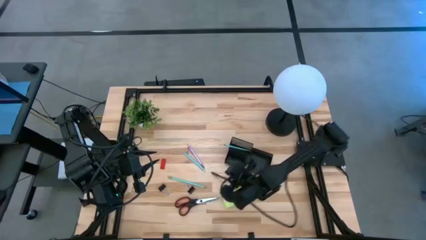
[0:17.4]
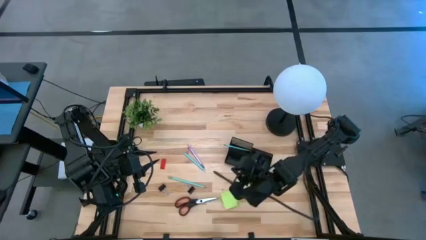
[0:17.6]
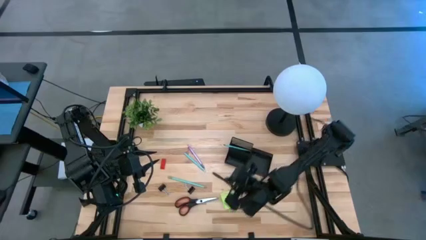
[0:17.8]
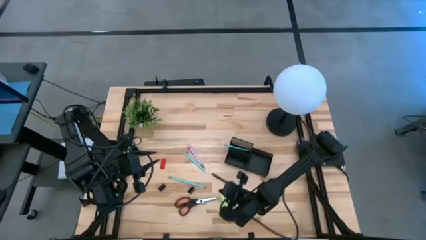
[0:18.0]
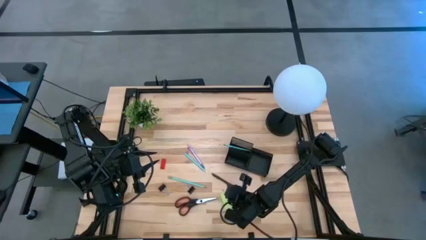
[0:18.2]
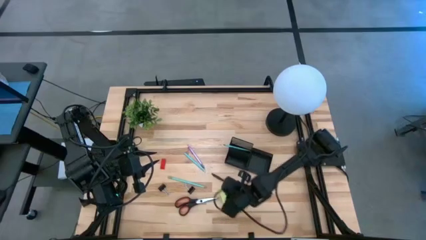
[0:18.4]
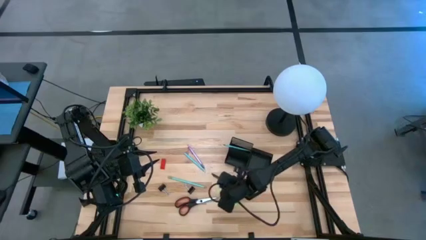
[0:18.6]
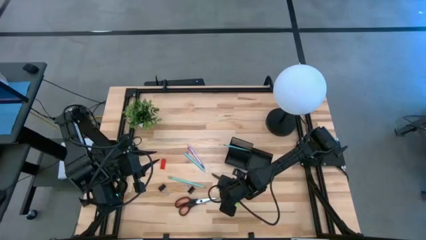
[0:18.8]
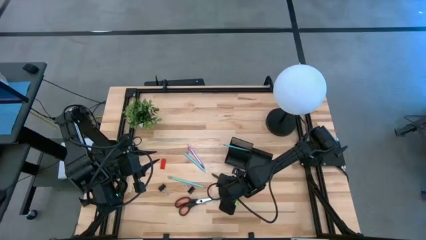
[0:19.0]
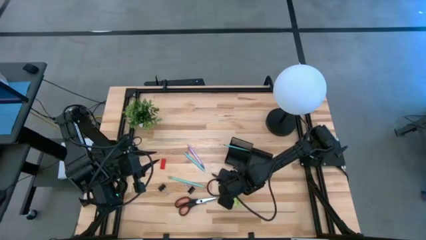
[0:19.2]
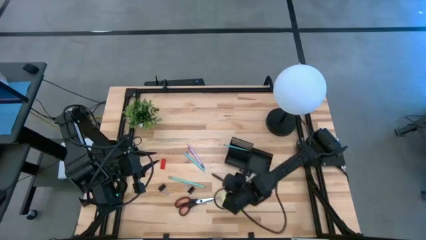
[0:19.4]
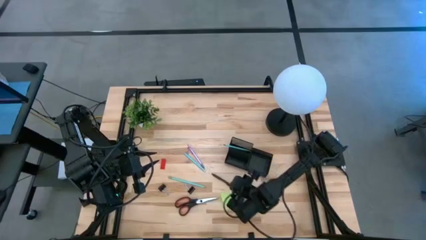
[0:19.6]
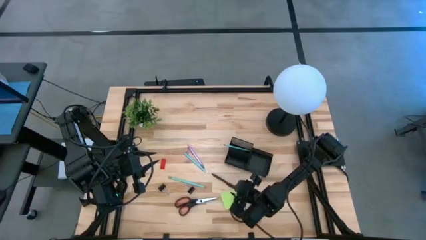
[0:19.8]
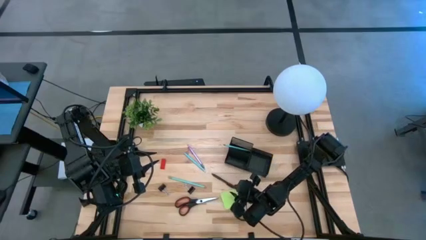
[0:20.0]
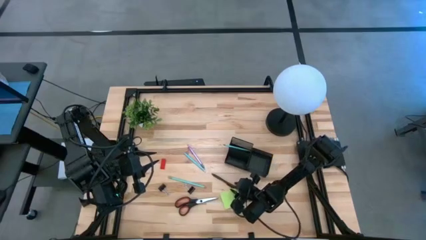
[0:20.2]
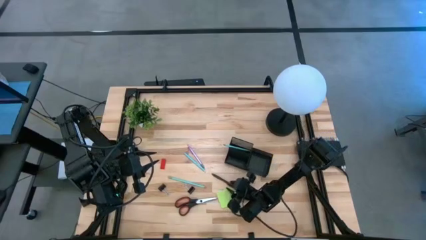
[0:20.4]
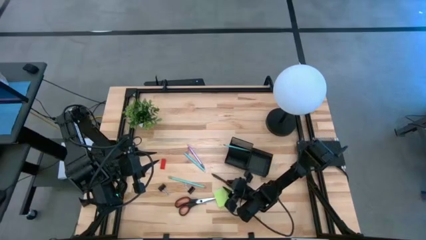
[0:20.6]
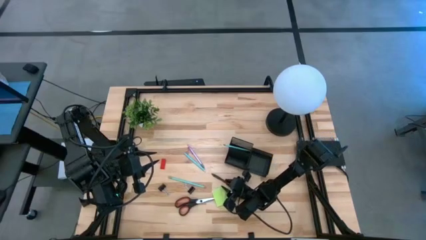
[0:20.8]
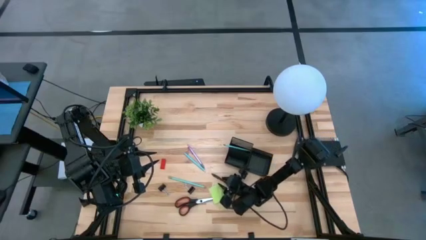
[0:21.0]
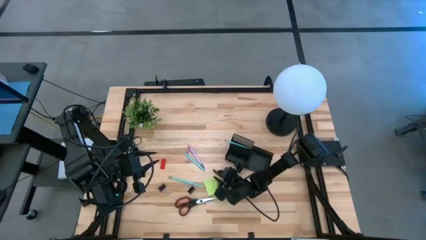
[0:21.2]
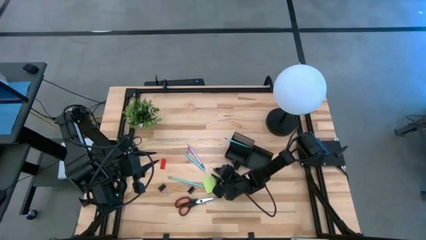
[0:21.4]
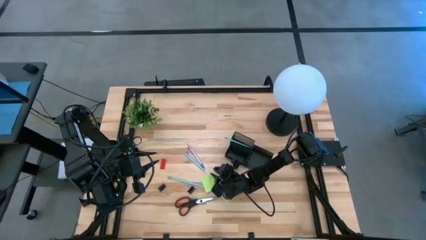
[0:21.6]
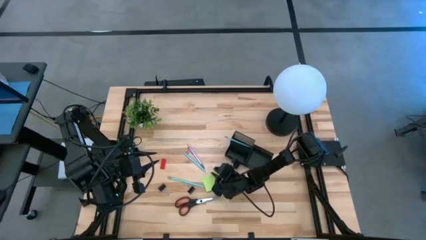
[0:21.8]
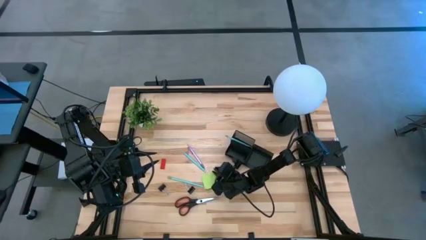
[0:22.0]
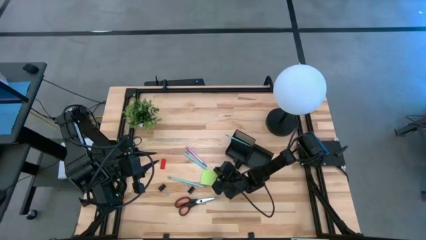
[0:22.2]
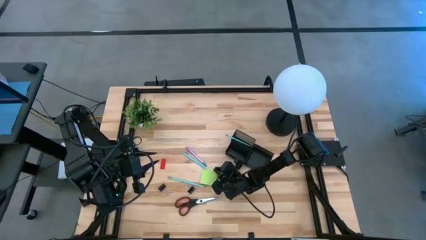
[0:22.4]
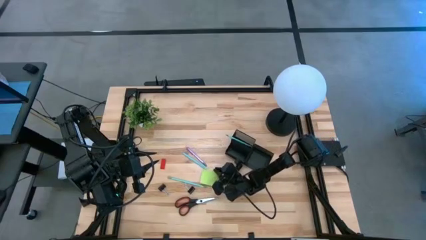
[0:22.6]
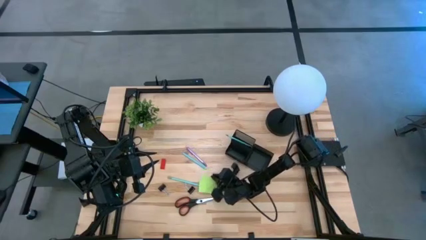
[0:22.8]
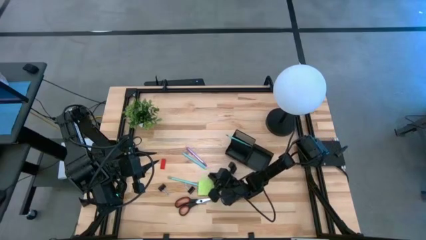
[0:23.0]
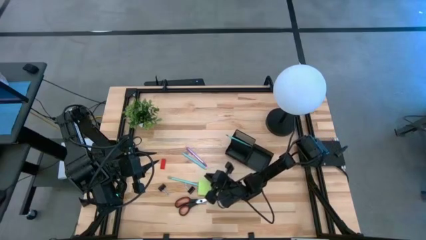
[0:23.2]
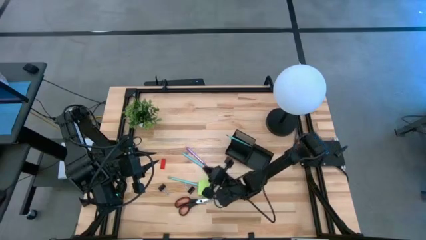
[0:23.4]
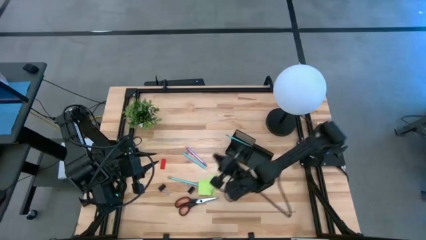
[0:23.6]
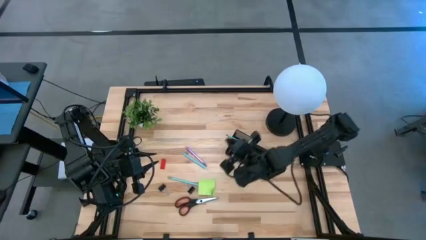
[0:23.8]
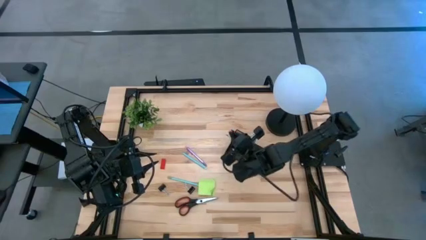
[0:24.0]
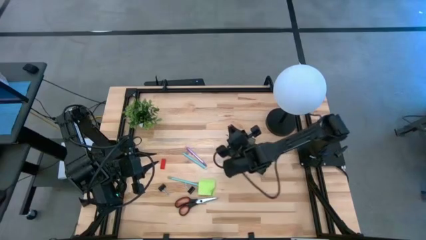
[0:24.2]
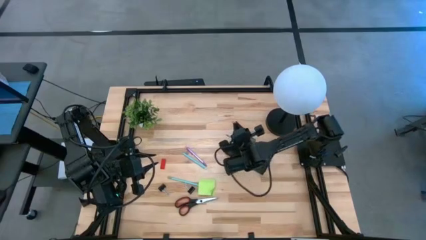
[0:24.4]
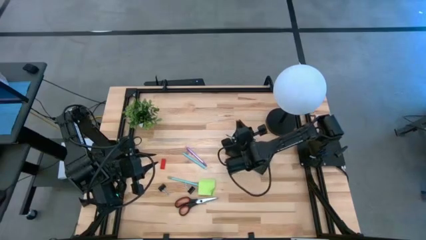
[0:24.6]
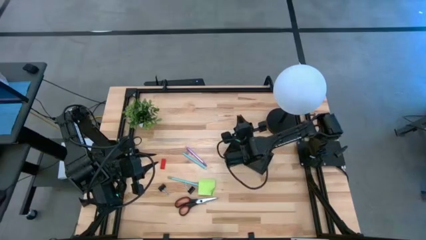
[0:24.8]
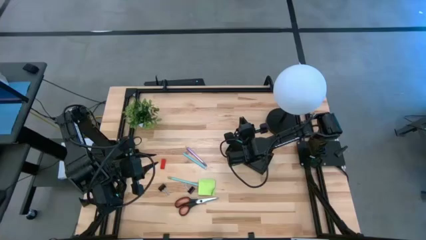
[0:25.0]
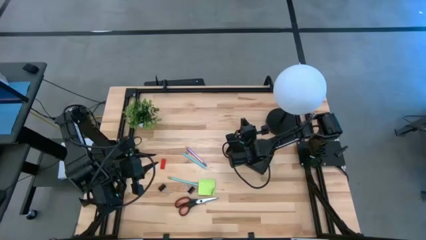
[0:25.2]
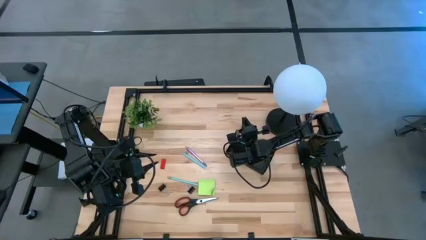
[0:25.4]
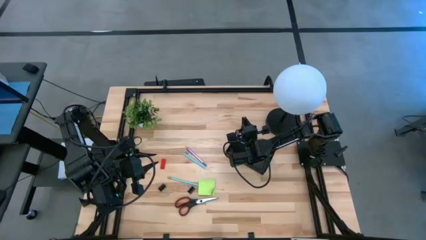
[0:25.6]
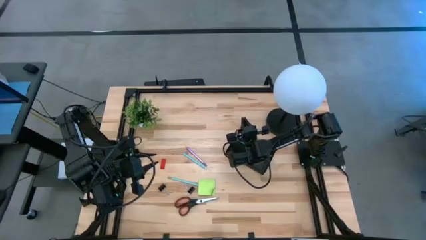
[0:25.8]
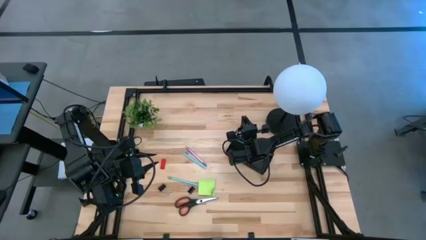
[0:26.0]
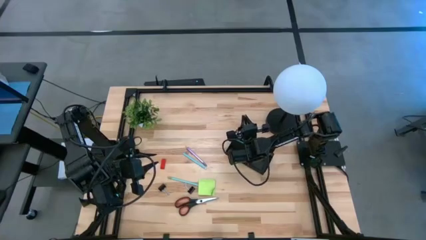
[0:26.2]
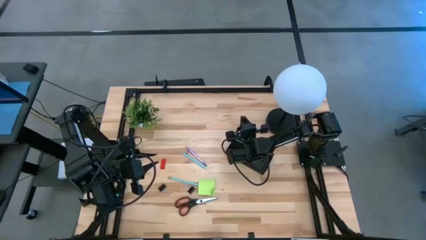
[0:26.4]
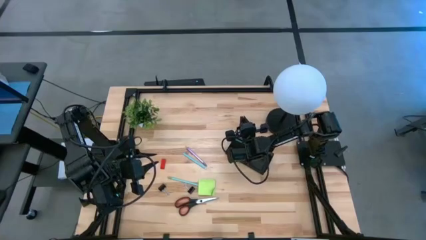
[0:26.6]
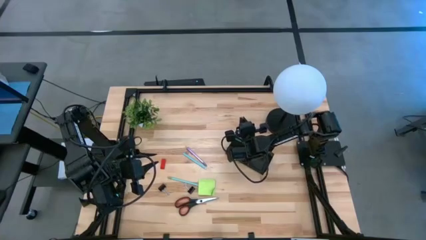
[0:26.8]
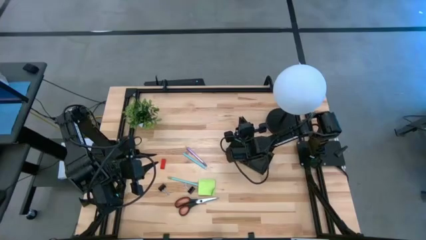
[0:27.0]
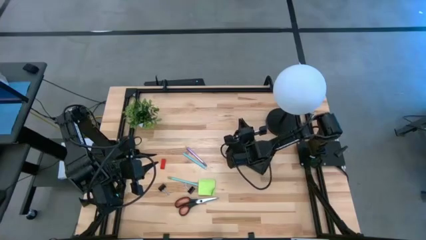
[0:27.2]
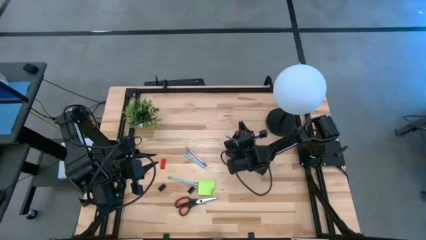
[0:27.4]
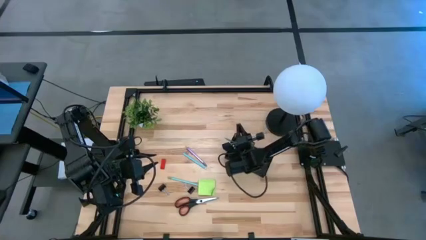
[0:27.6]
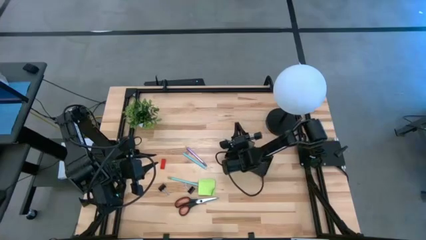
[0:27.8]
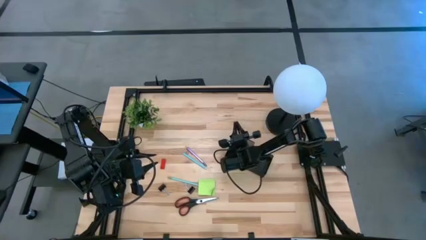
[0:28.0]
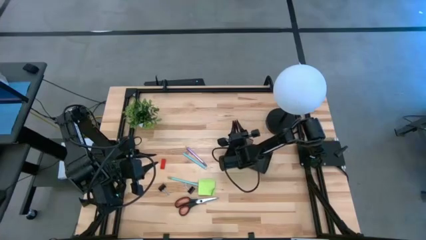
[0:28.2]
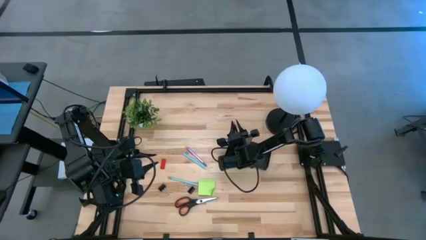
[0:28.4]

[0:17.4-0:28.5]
Task: Pick and place office supplies into organizer
Put the brown pen into the desk organizer

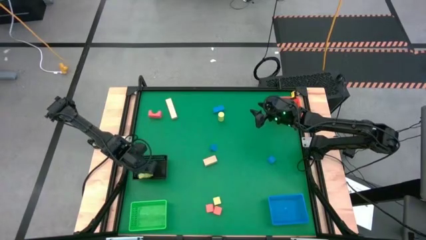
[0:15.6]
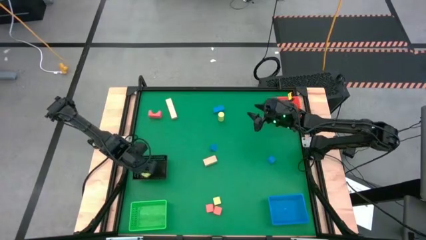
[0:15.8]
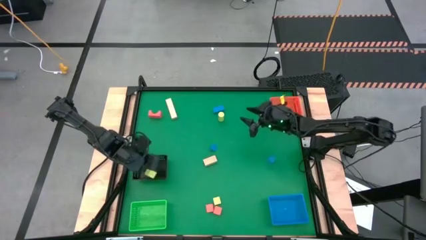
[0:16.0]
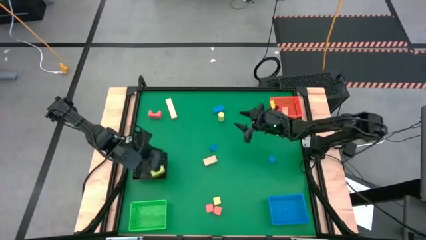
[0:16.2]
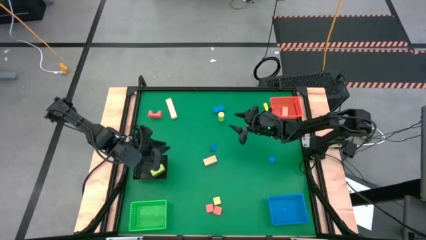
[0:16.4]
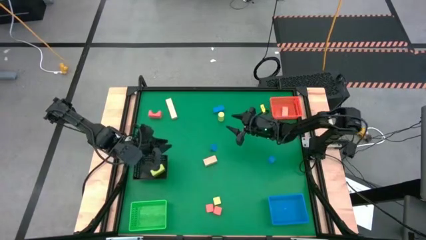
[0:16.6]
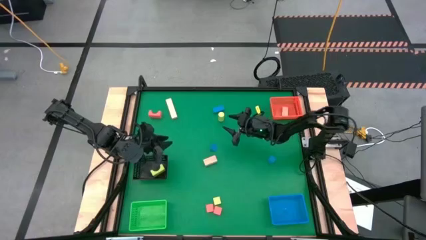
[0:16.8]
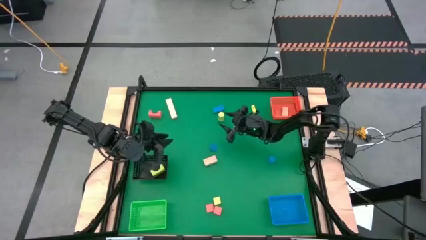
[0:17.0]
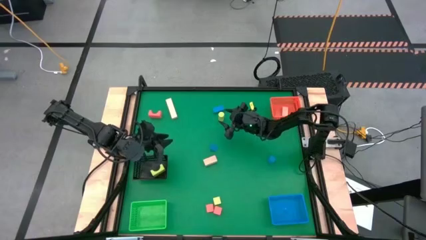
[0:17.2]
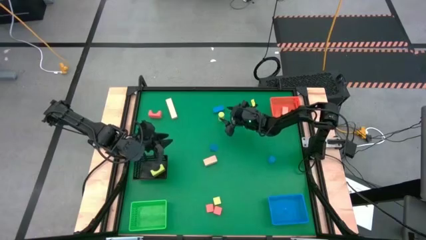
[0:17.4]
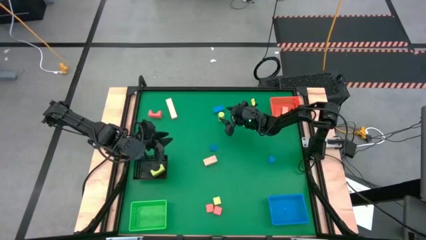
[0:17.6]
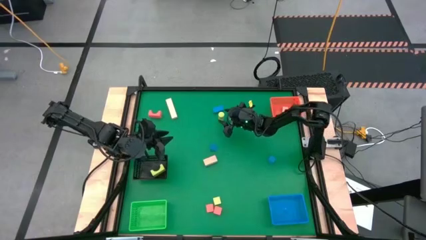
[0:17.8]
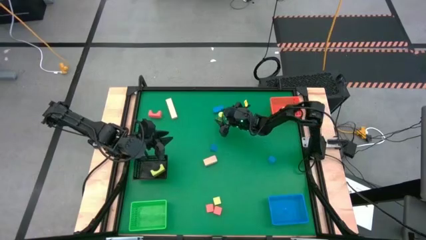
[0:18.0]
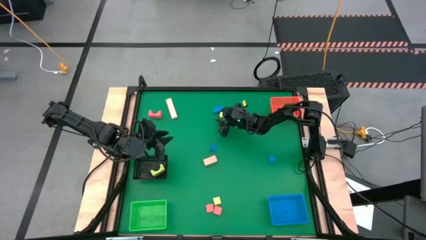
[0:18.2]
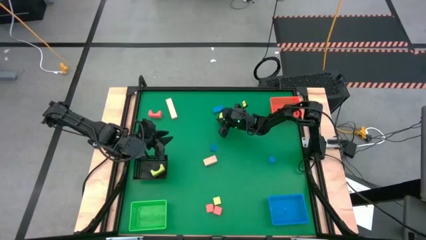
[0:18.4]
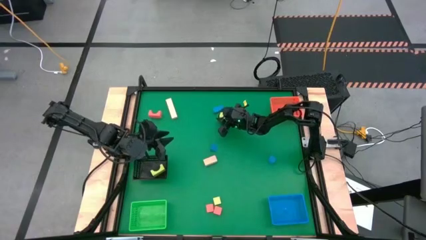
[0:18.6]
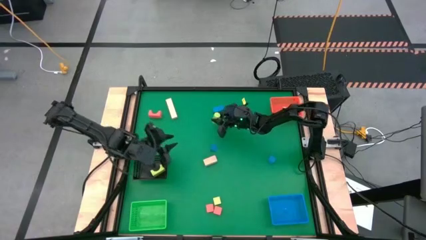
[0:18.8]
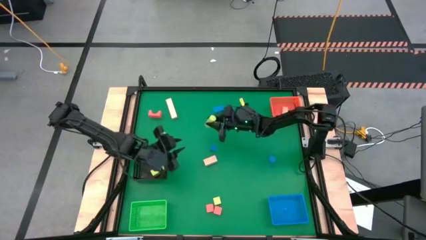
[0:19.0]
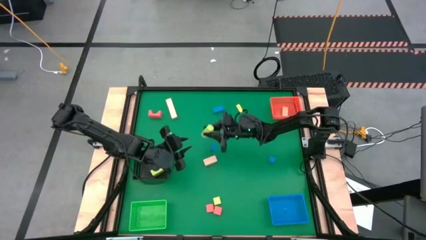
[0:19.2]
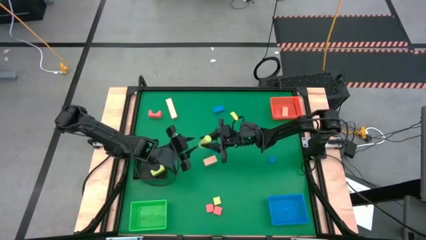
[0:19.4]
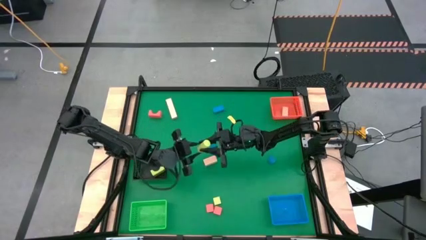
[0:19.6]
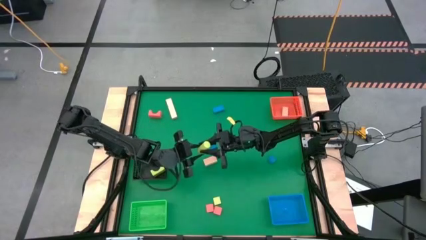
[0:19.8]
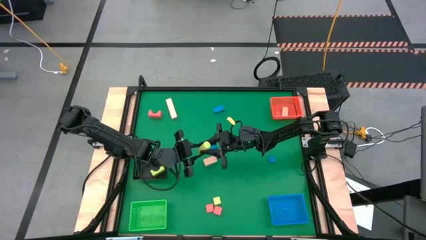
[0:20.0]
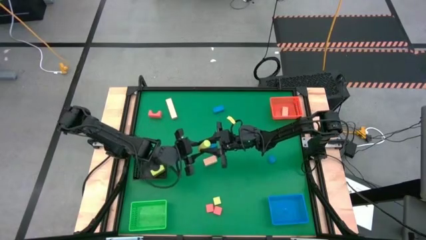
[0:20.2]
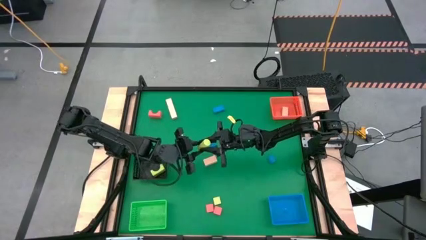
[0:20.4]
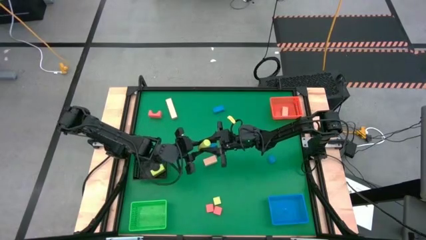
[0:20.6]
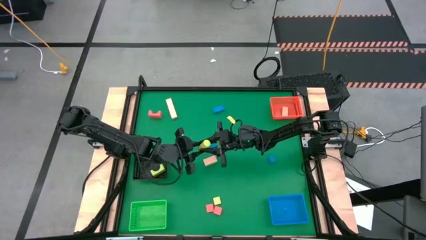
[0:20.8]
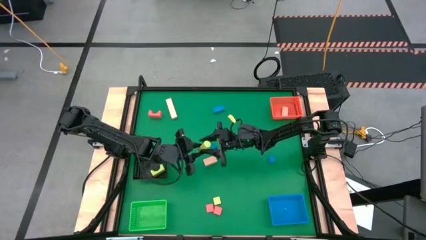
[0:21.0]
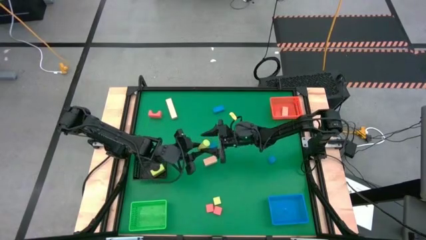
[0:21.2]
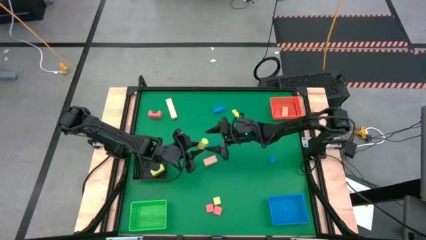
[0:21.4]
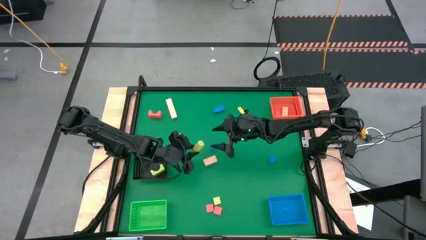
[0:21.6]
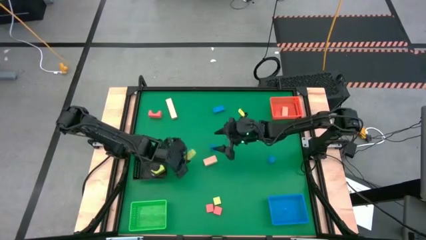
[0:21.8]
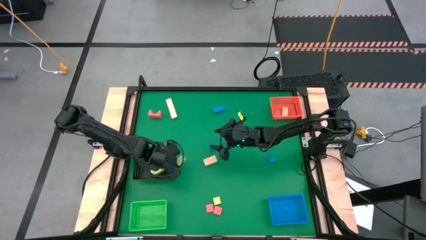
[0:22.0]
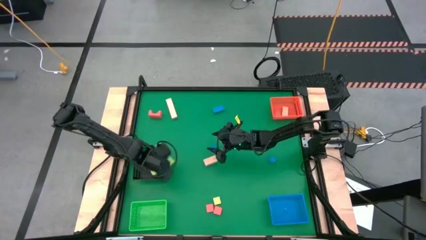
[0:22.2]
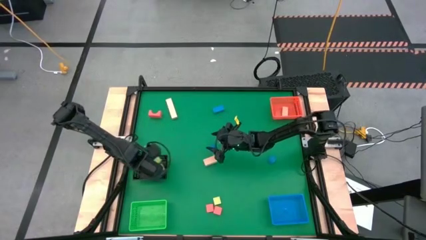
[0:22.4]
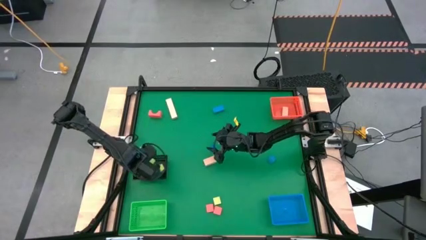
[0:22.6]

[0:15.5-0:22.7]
Task: Sort & place blocks by color
Put the top yellow wooden block into the black basket
